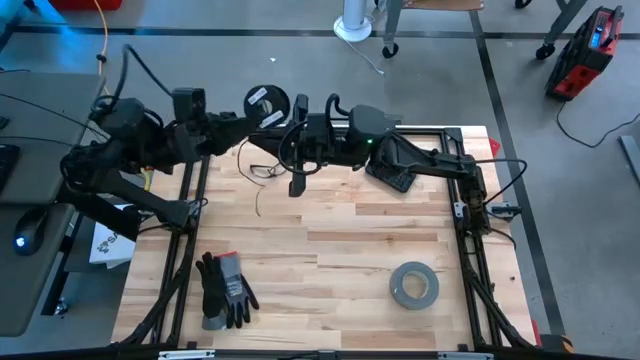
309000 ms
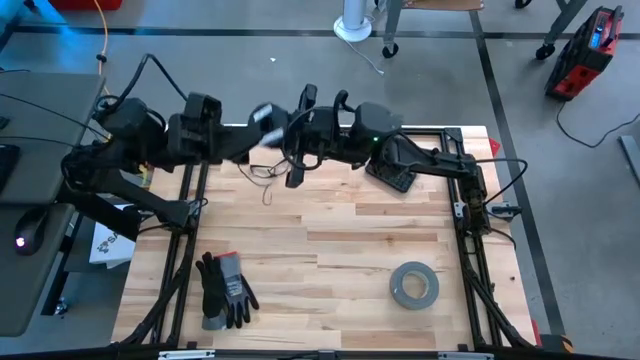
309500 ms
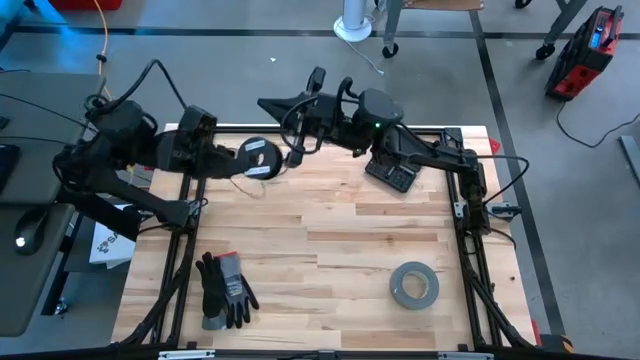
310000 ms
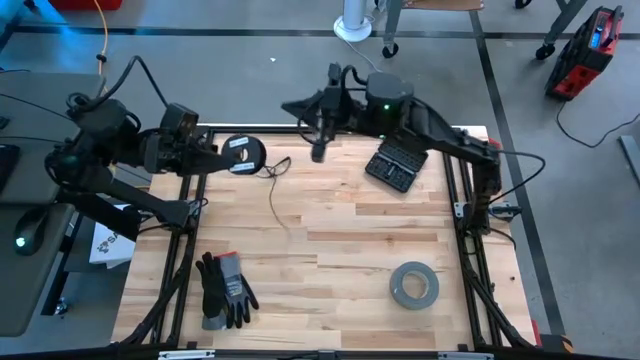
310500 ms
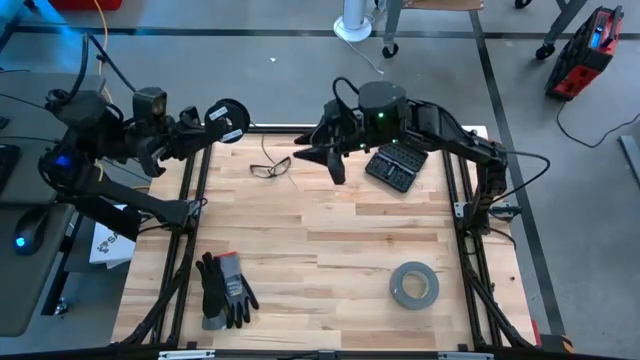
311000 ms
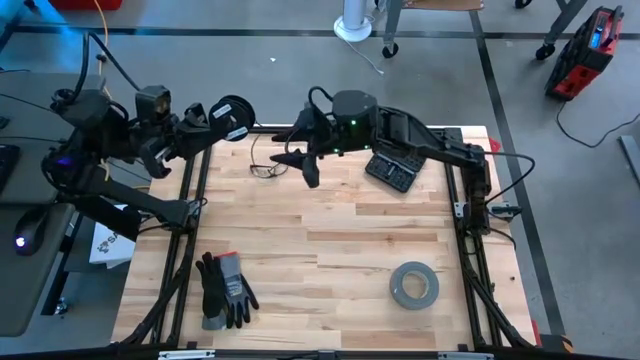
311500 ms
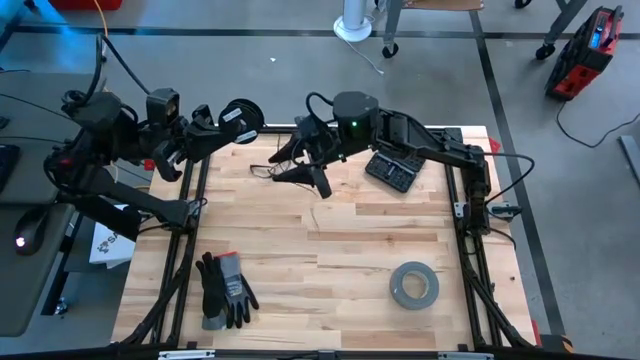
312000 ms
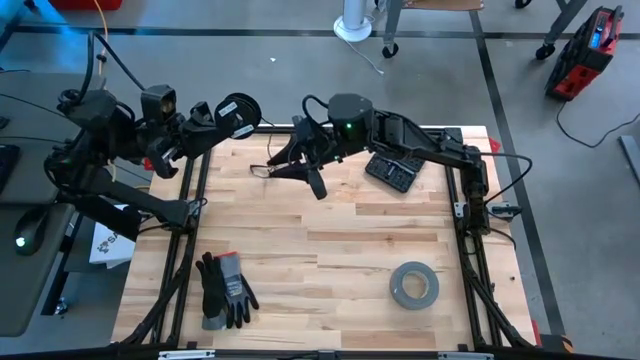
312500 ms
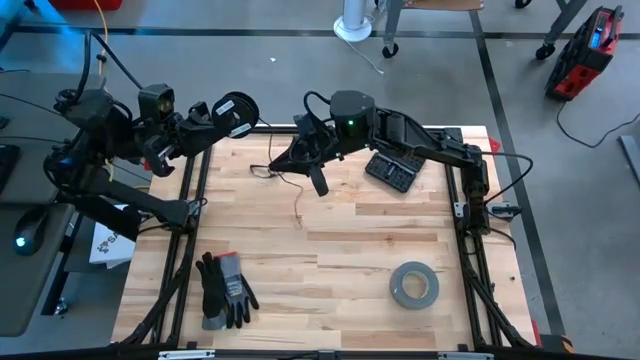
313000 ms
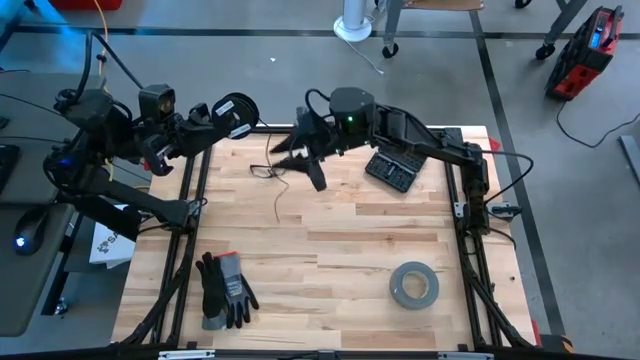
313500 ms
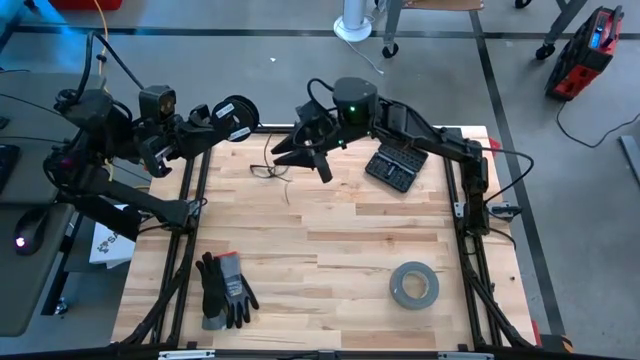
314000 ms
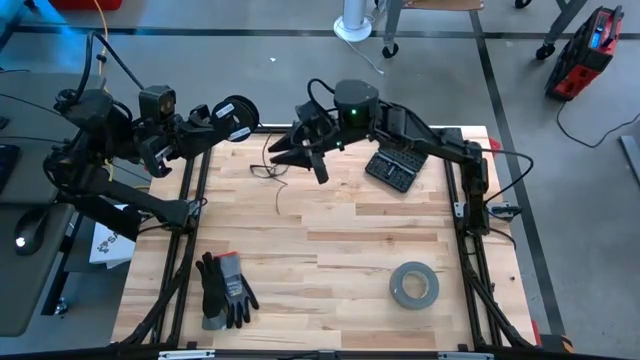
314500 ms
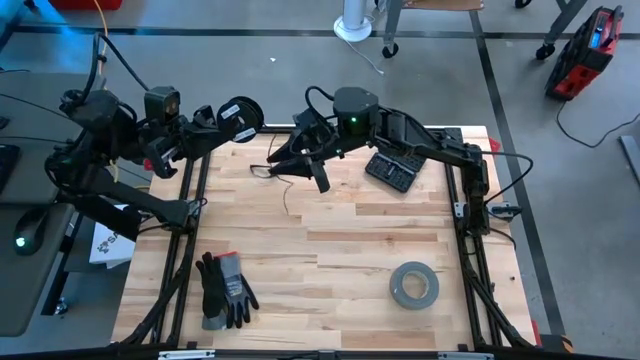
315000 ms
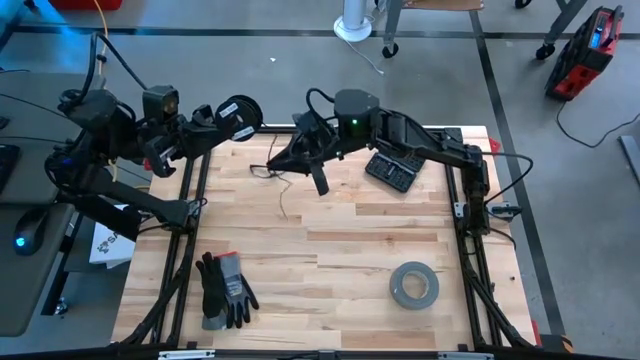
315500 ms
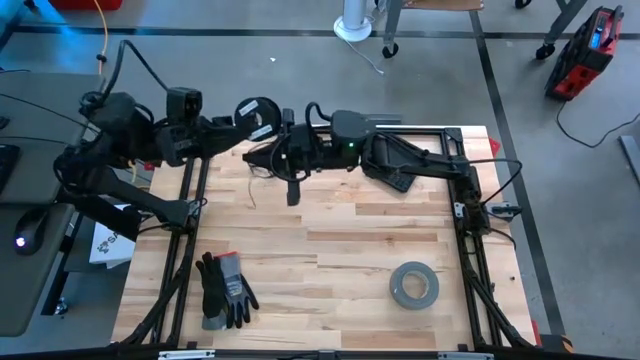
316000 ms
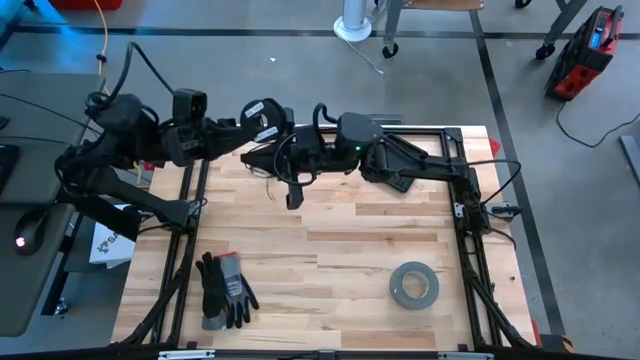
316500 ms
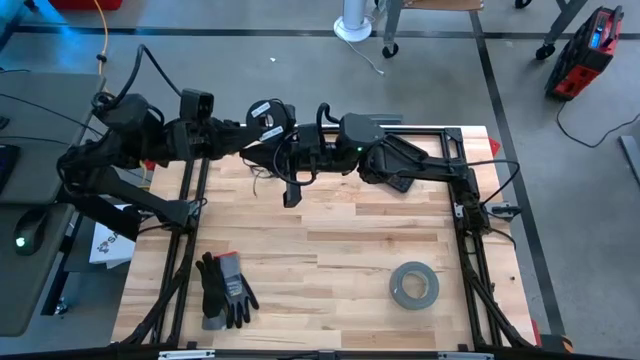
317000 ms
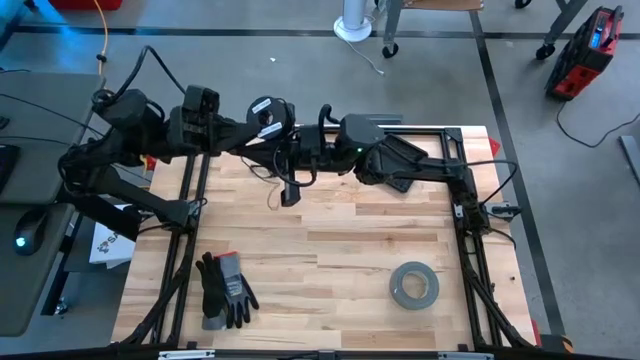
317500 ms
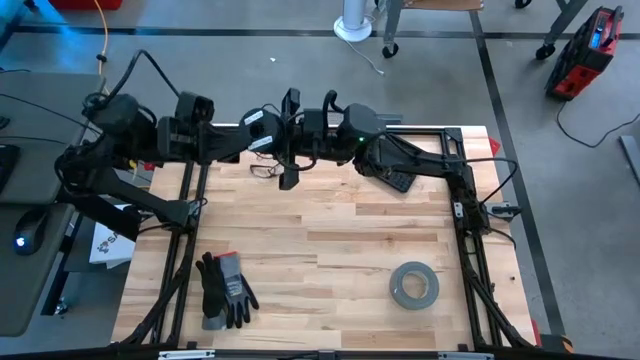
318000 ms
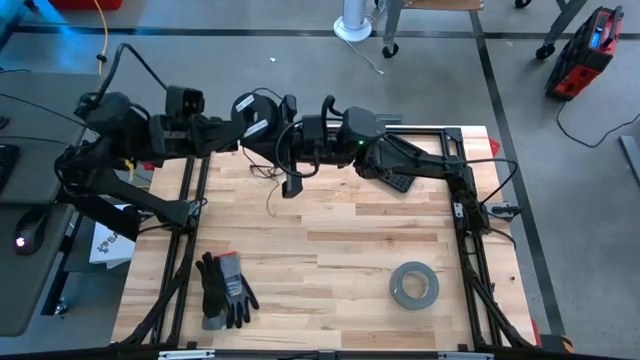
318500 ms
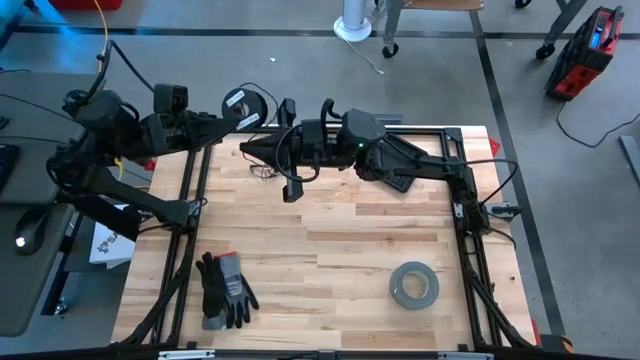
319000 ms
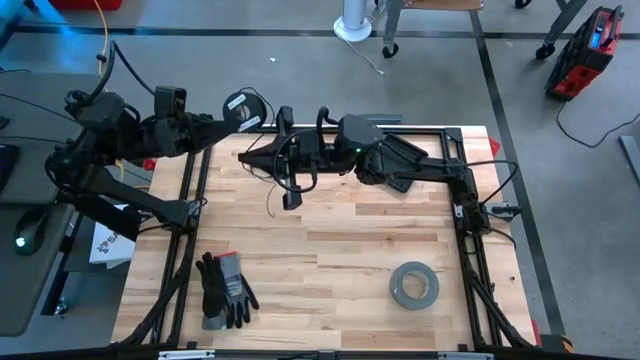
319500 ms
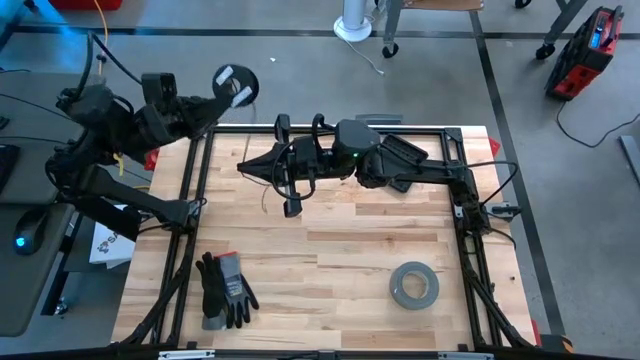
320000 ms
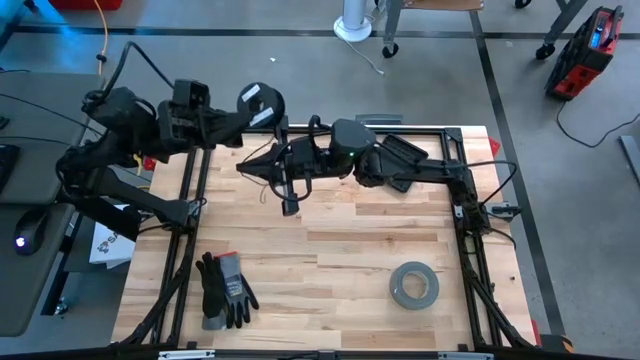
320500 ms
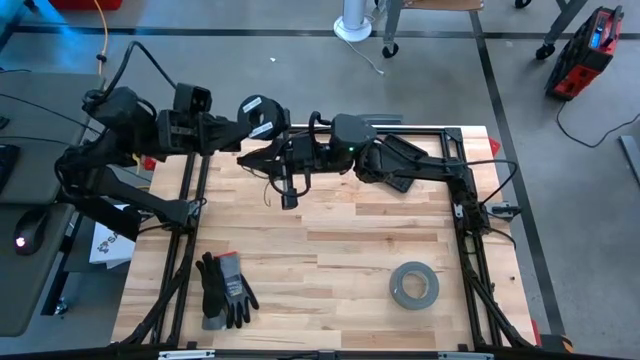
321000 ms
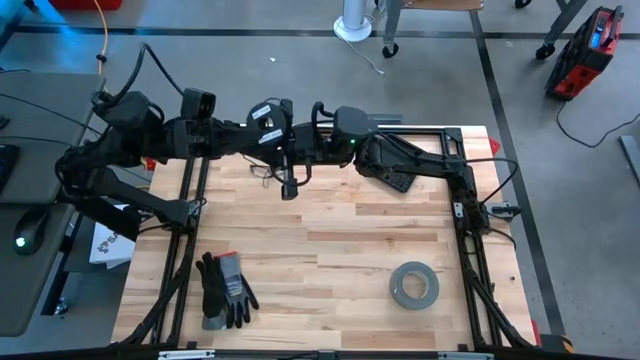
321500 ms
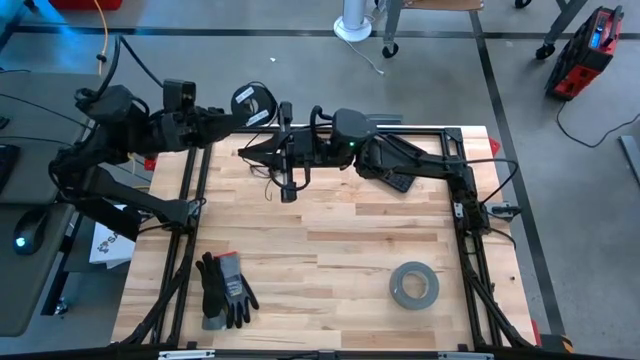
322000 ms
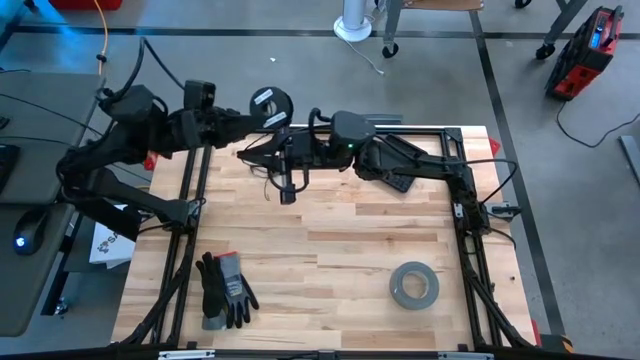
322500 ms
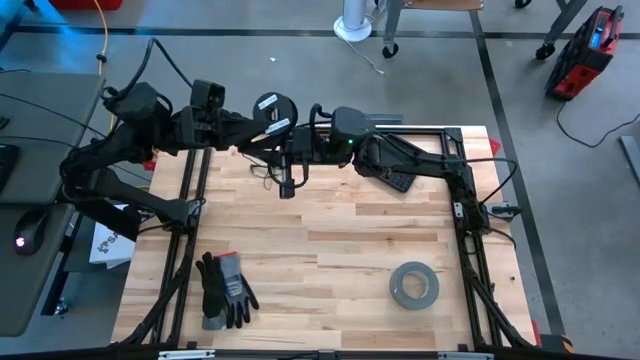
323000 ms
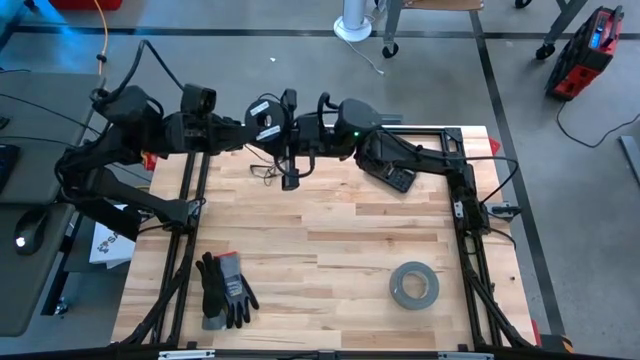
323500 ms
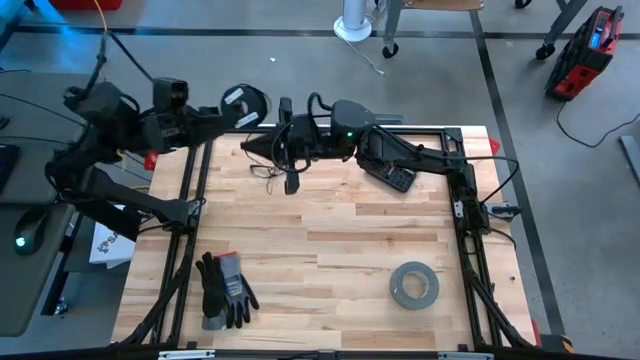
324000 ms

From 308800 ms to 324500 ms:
Task: Coil cords
Coil the black wire on the black spool
